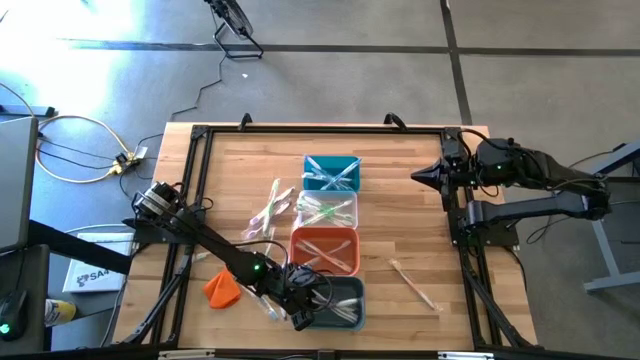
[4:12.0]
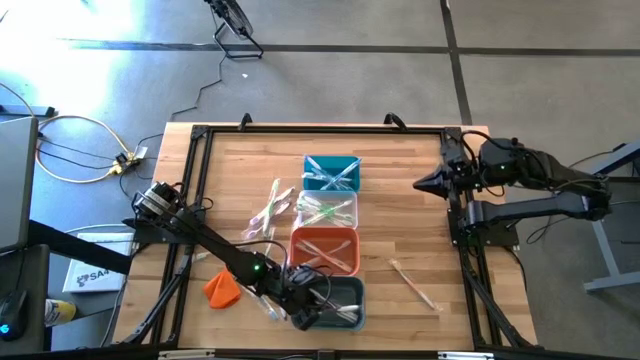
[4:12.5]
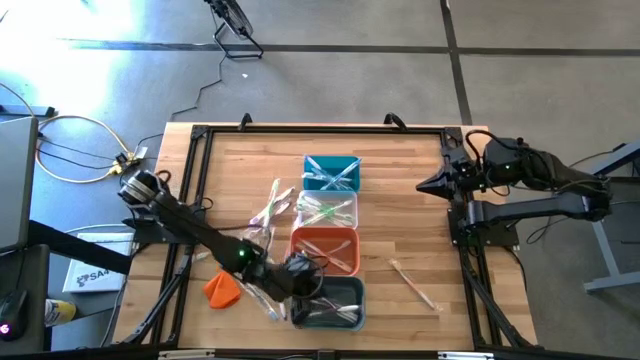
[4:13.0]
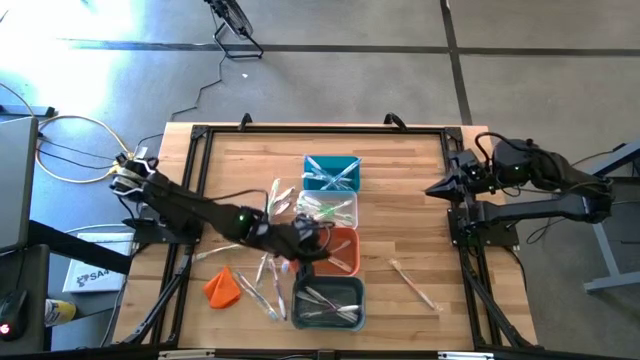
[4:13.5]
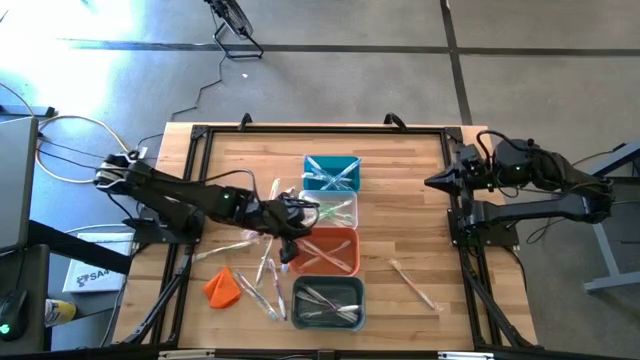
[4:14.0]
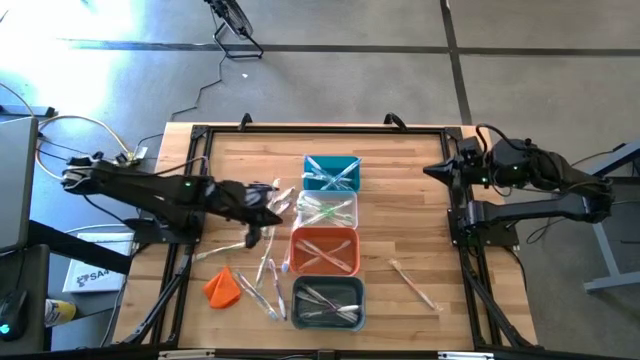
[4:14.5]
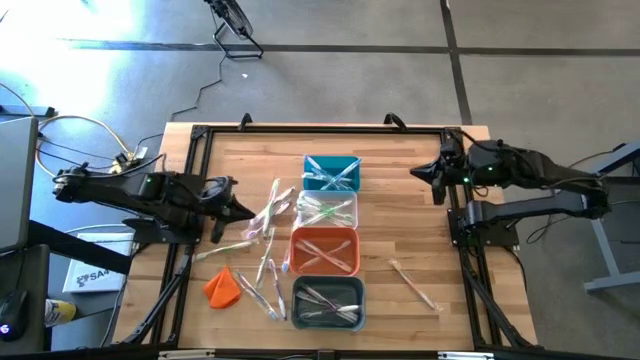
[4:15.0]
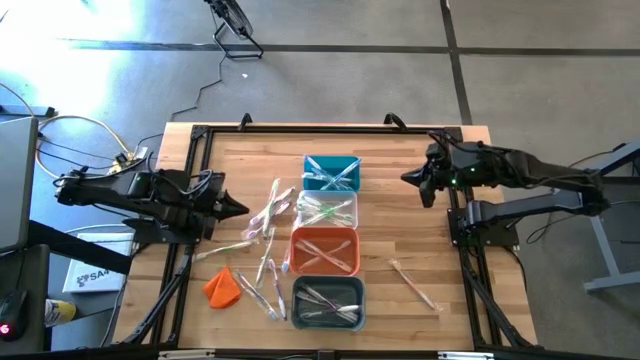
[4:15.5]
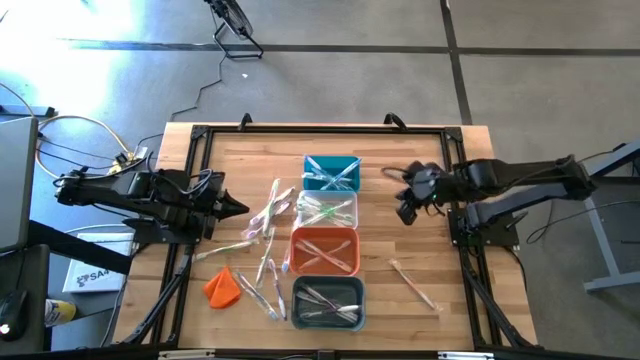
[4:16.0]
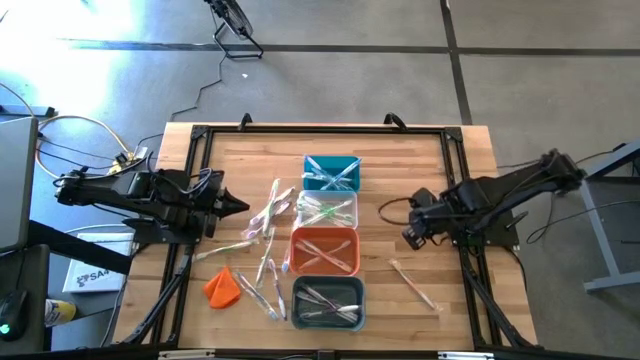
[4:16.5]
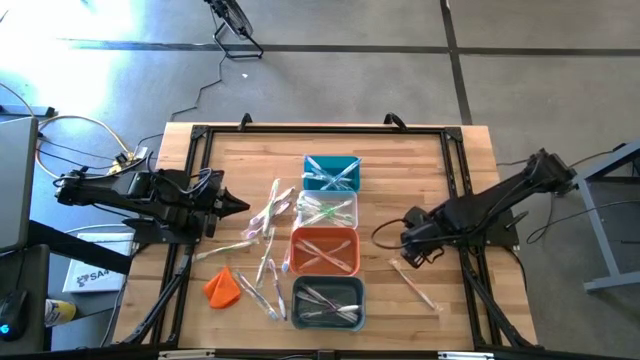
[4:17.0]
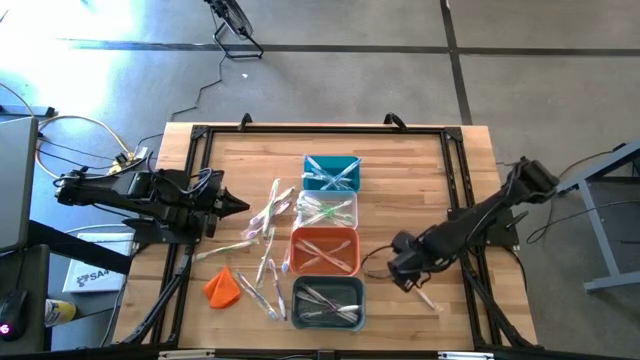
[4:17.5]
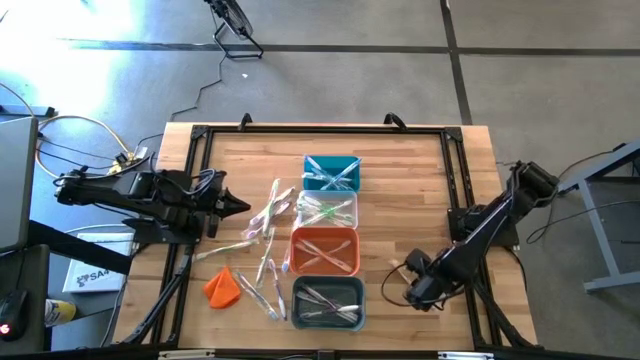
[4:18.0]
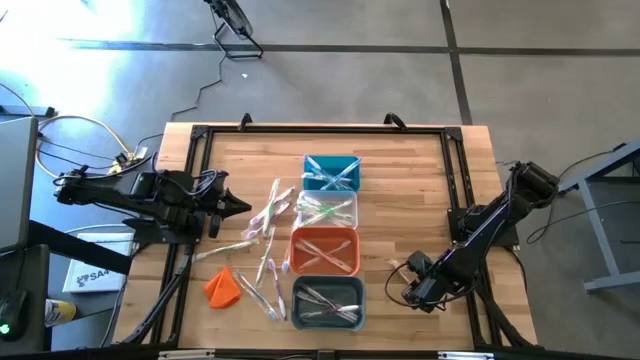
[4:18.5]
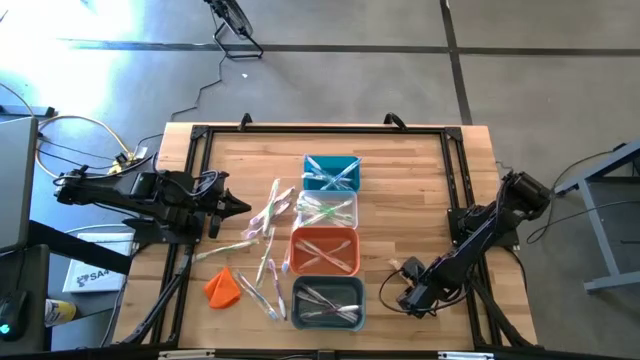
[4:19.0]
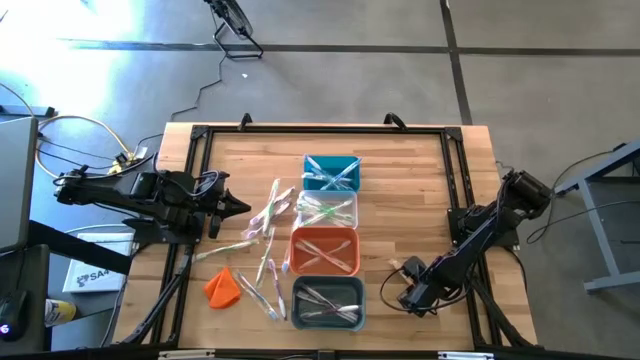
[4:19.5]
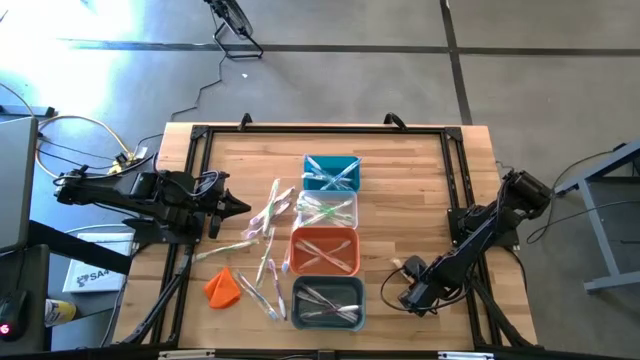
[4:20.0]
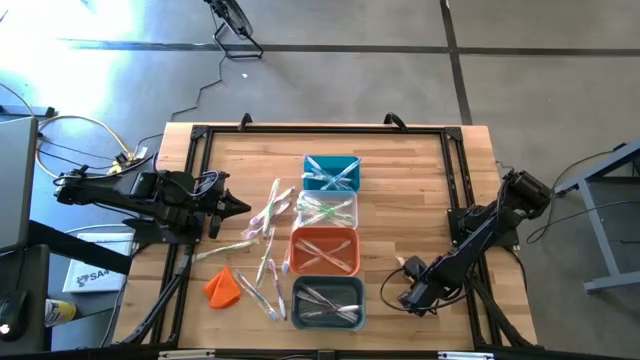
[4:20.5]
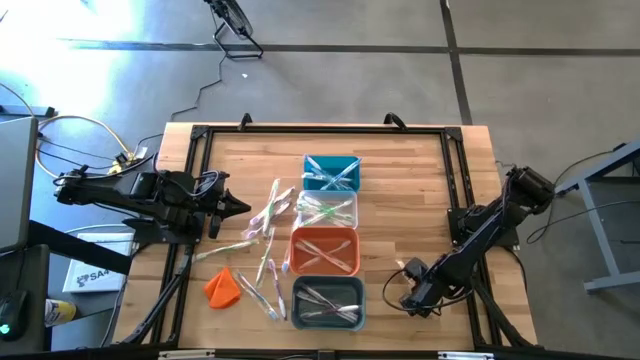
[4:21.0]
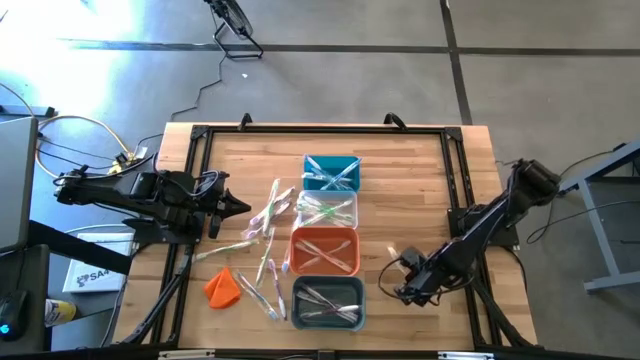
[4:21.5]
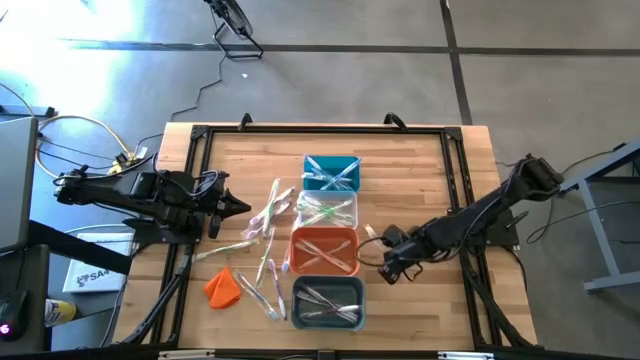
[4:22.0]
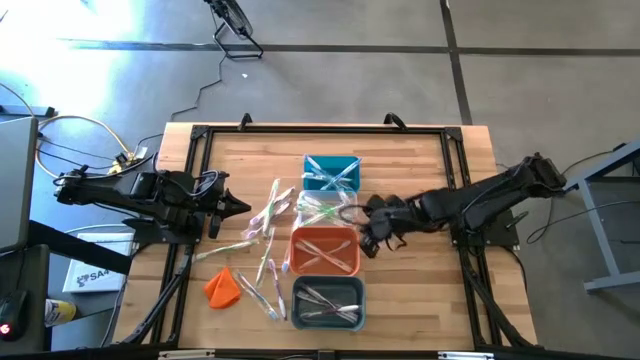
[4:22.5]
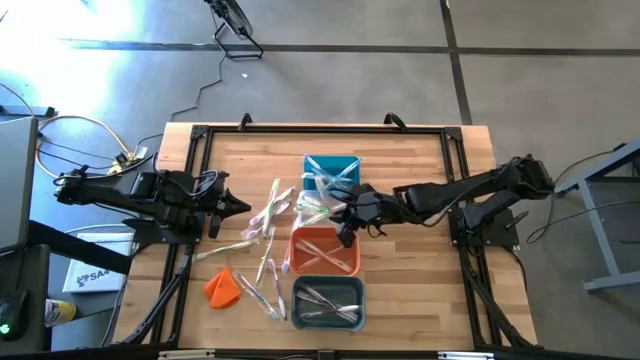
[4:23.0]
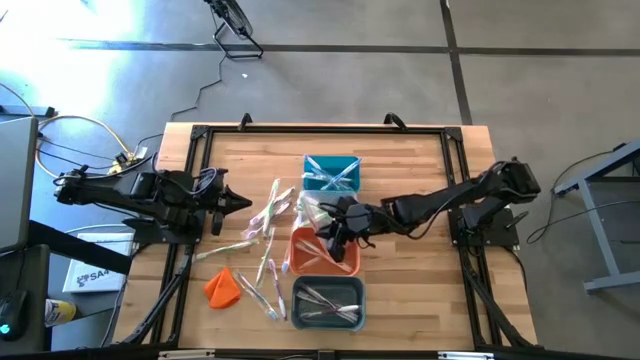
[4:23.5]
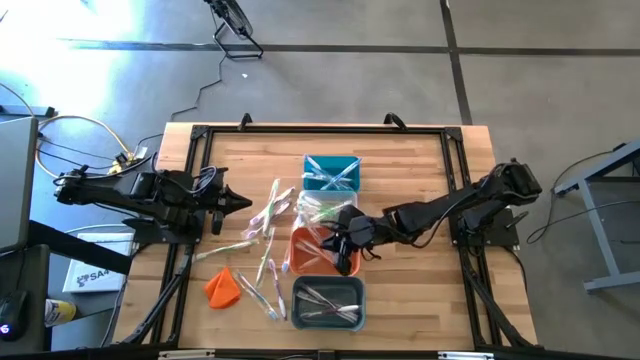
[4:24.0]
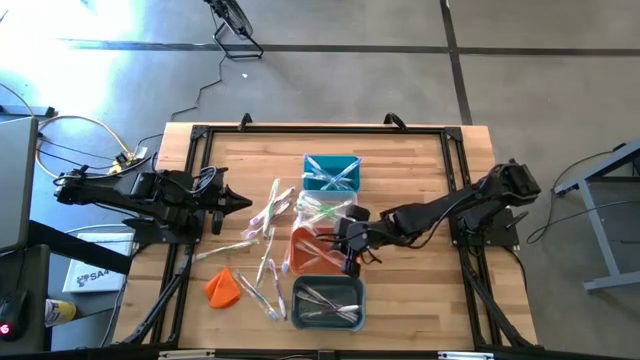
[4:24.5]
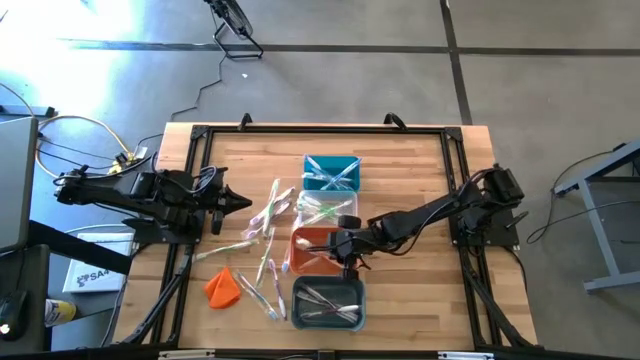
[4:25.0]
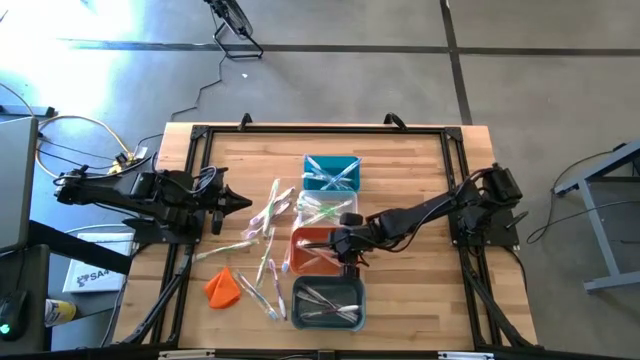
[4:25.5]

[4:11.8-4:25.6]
Task: Pick & Place Toothbrushes
Put the orange toothbrush into the orange bin

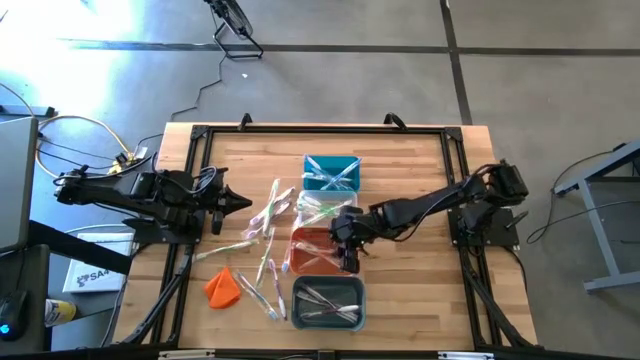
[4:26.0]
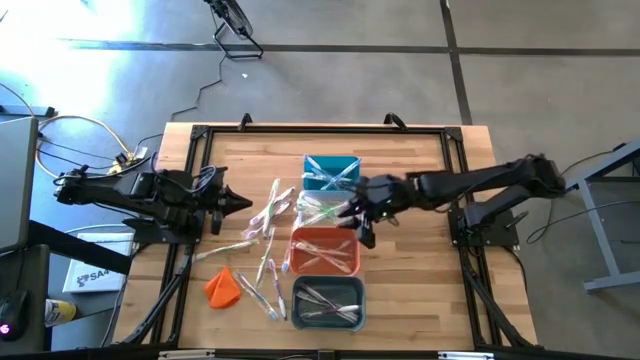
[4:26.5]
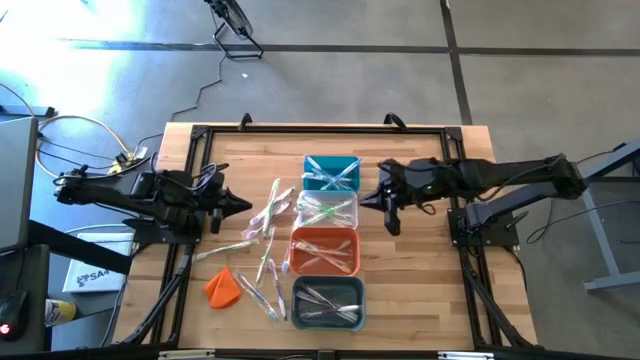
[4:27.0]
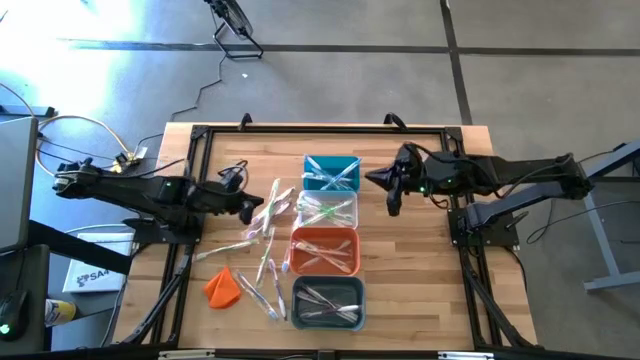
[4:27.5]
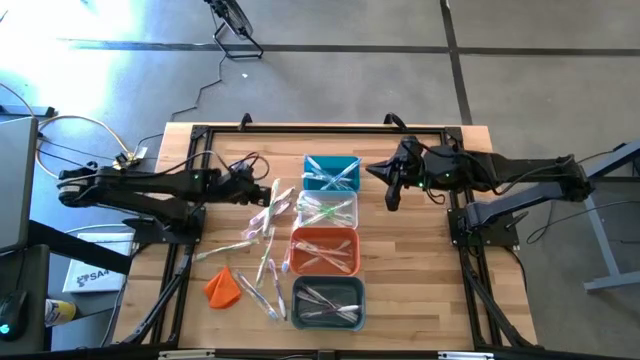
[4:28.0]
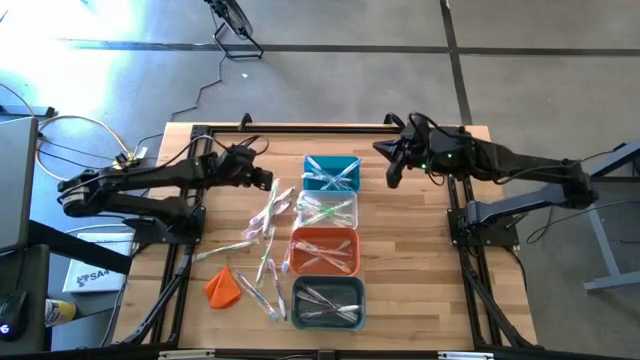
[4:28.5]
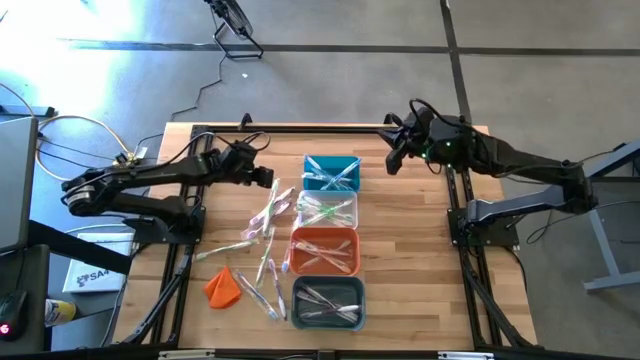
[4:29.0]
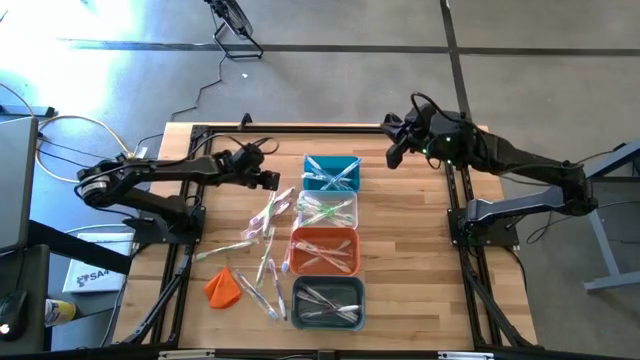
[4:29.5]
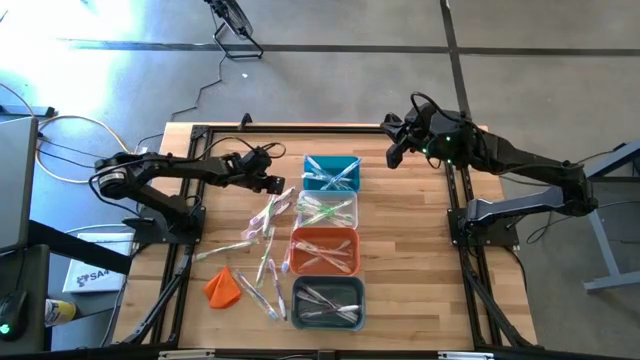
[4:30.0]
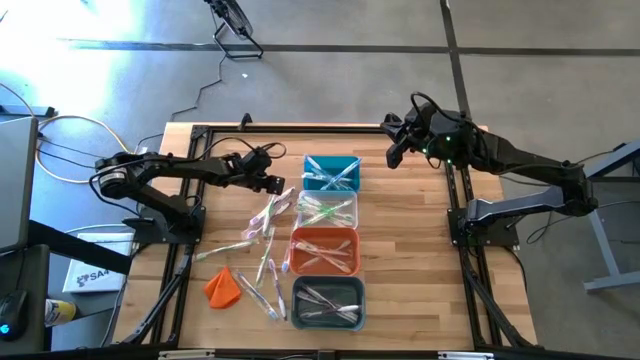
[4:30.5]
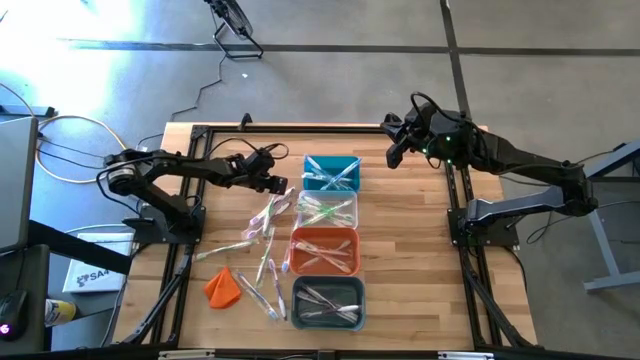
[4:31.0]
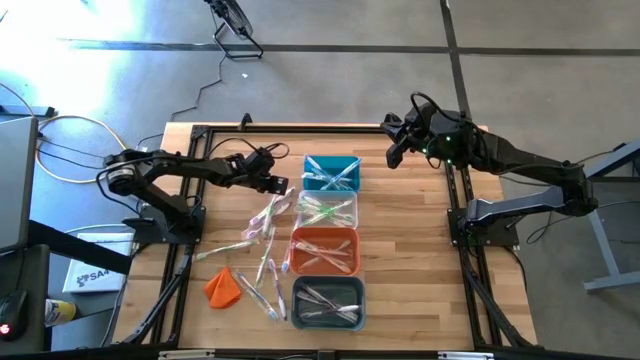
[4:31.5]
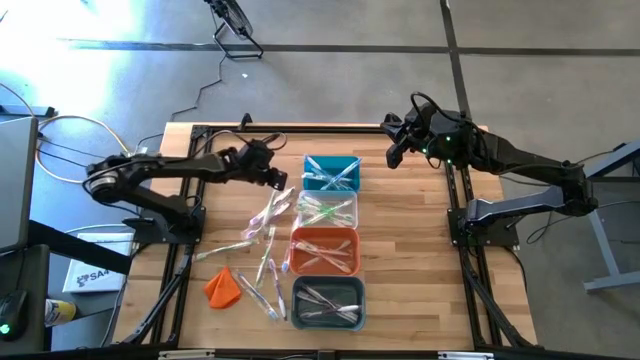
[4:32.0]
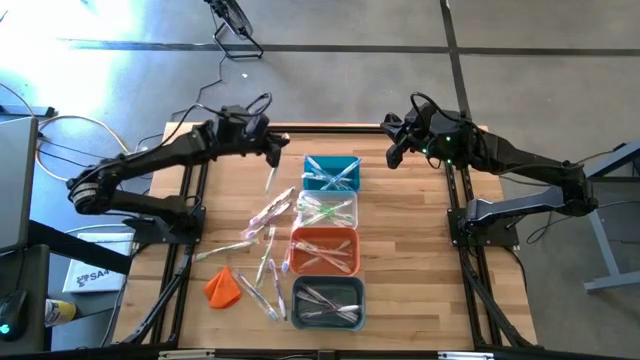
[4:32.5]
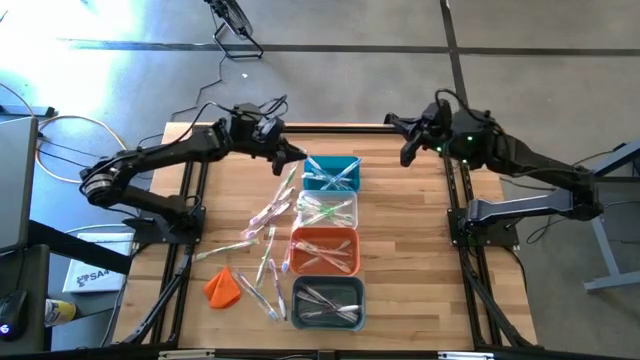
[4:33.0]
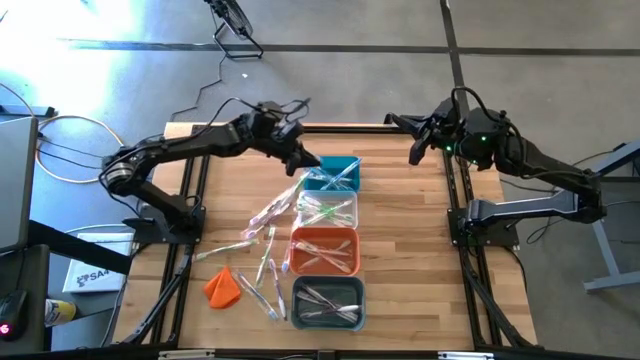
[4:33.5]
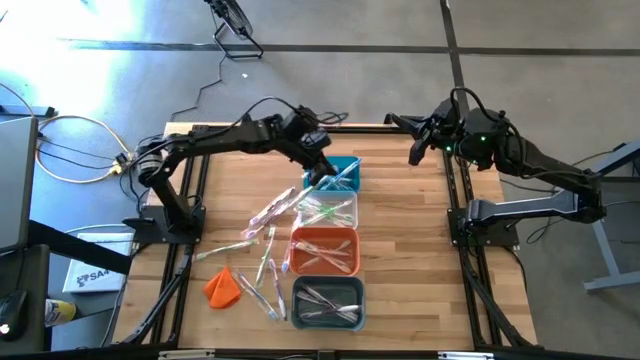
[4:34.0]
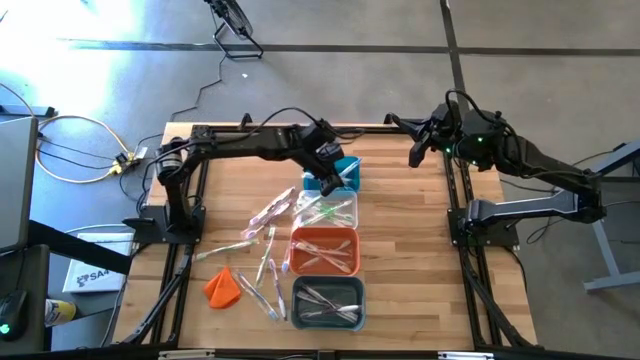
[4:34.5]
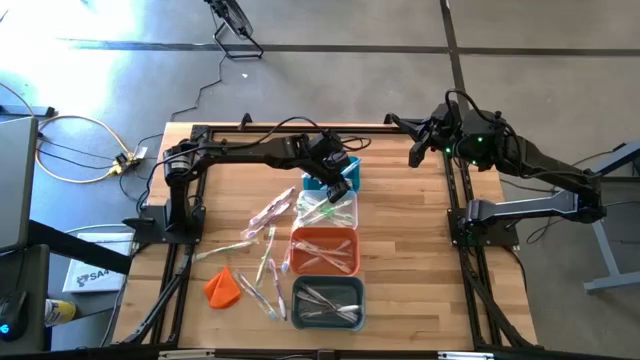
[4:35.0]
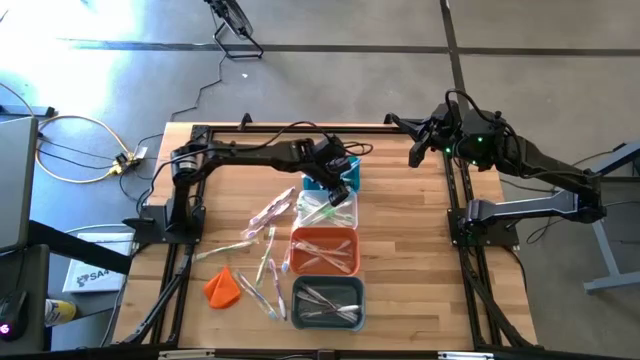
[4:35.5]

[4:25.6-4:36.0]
Put the green toothbrush into the transparent bin
